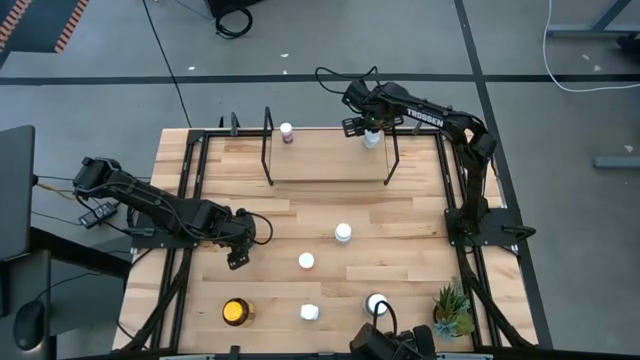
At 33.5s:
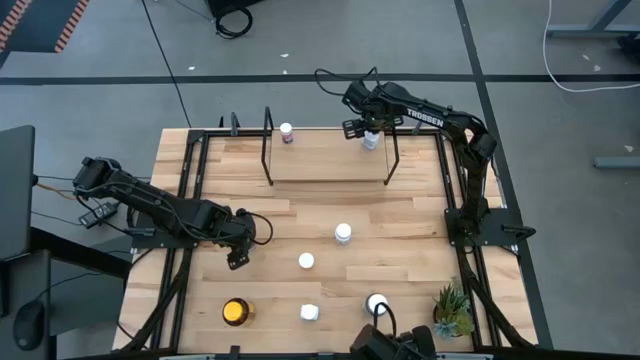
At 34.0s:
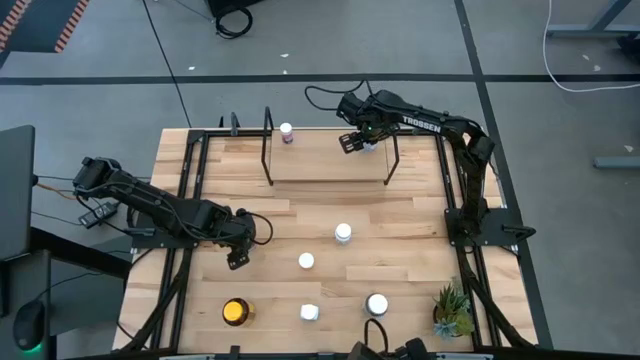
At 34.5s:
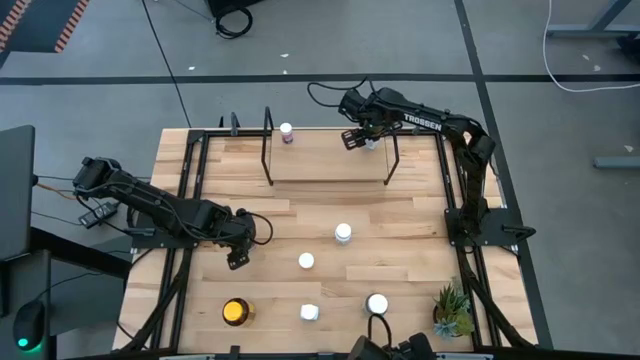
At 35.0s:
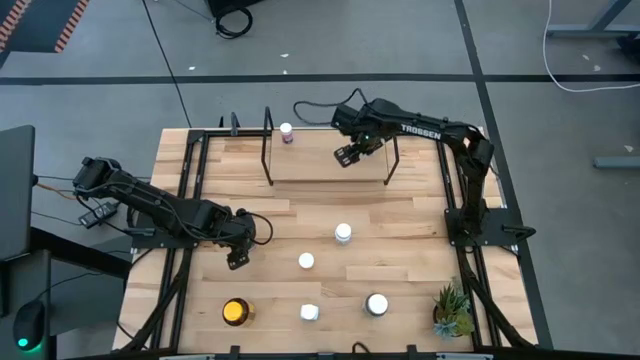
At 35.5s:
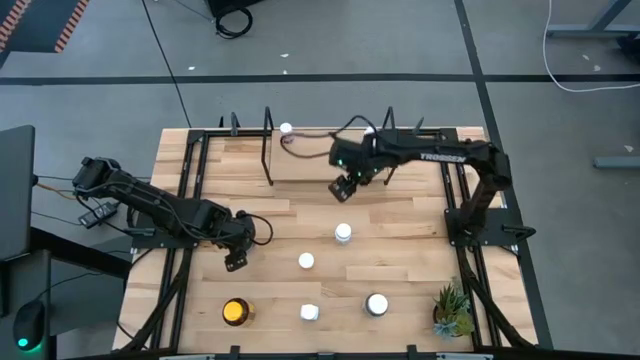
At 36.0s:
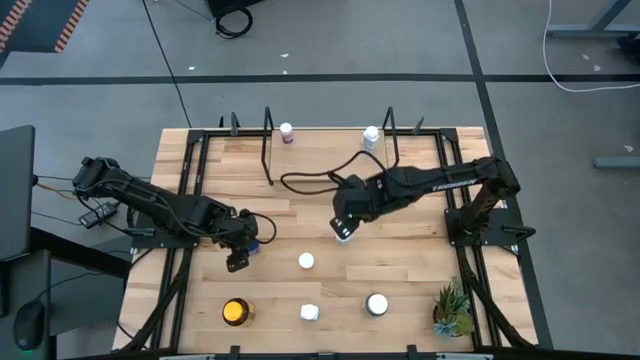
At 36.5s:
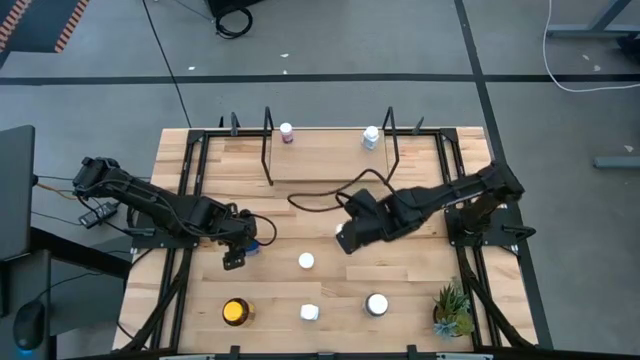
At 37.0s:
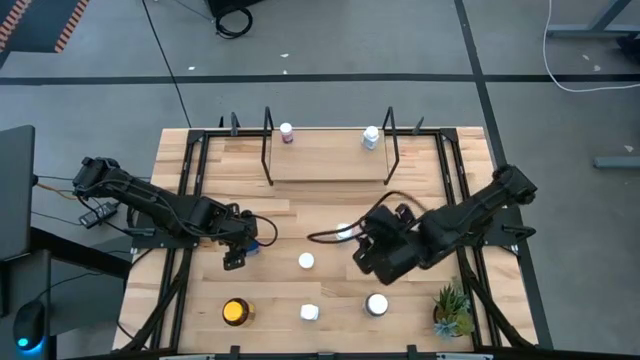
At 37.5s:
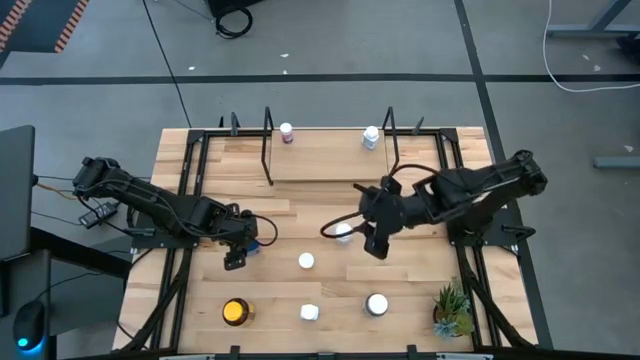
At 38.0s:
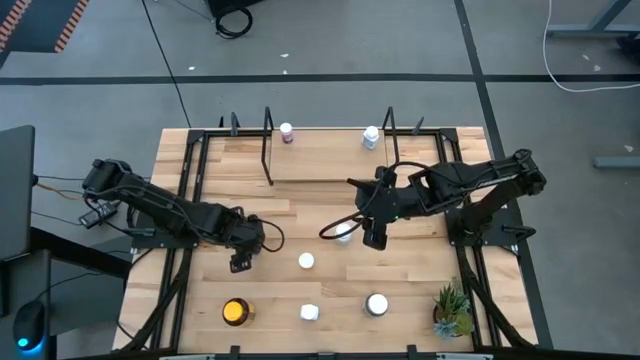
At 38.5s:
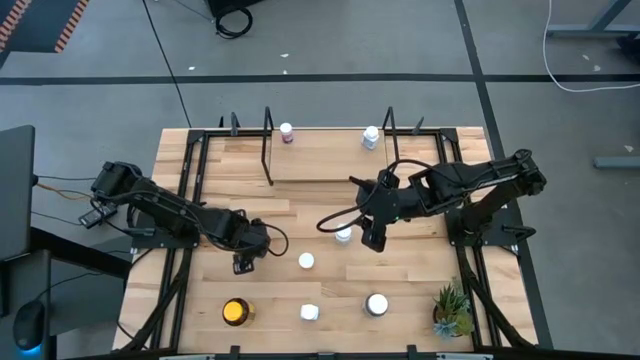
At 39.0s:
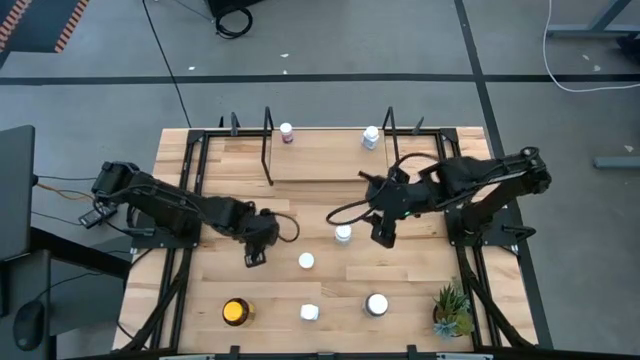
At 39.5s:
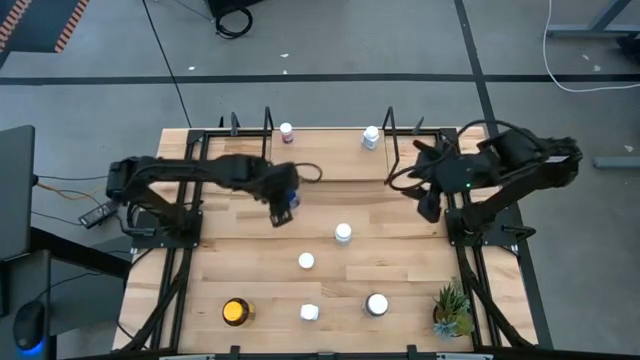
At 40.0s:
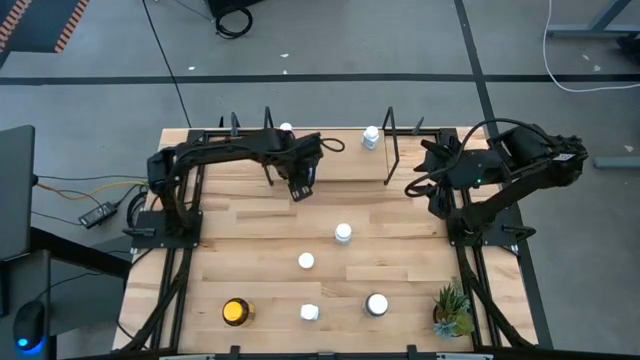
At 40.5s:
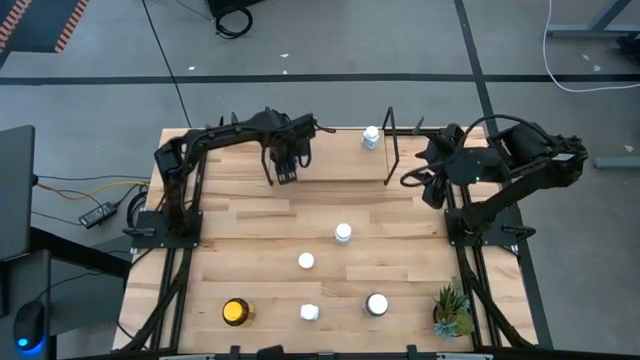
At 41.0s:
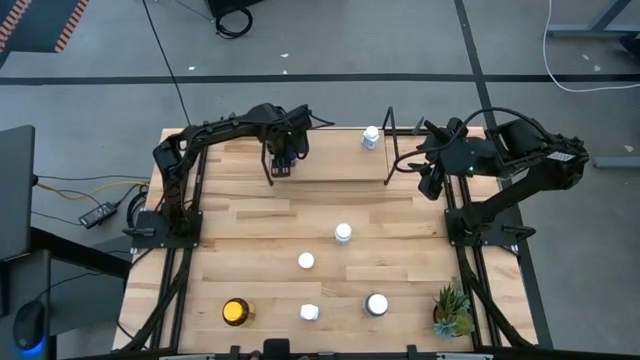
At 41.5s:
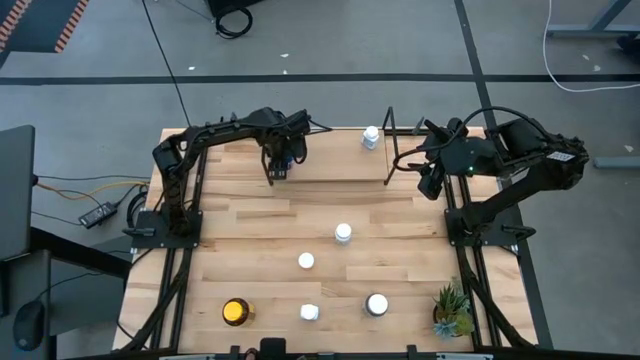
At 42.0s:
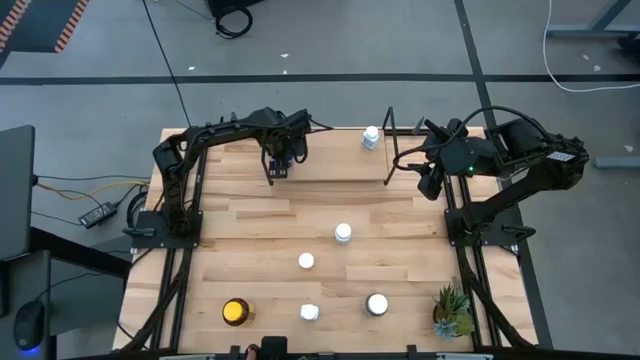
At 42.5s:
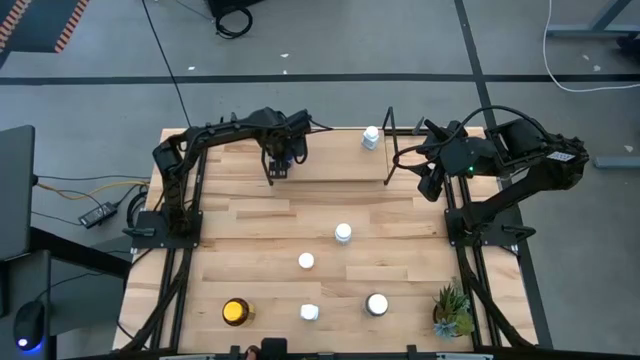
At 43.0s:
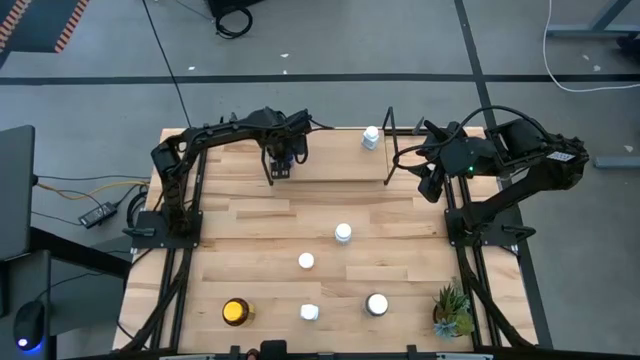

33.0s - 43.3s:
Task: Pick and place medicine bottles onto shelf by color
Put the blue pill bottle on the shelf

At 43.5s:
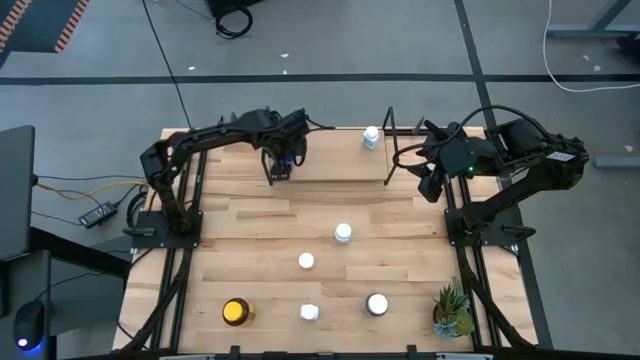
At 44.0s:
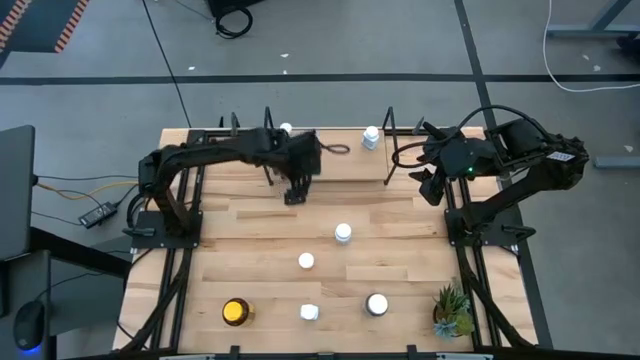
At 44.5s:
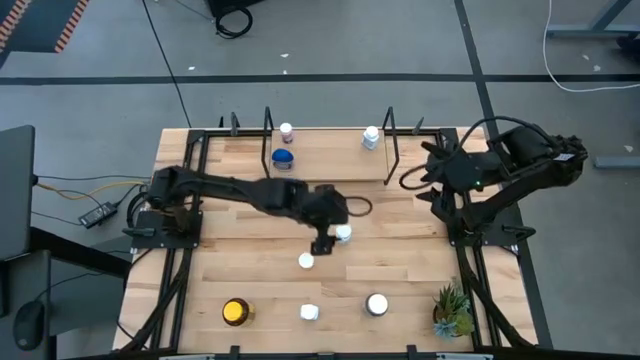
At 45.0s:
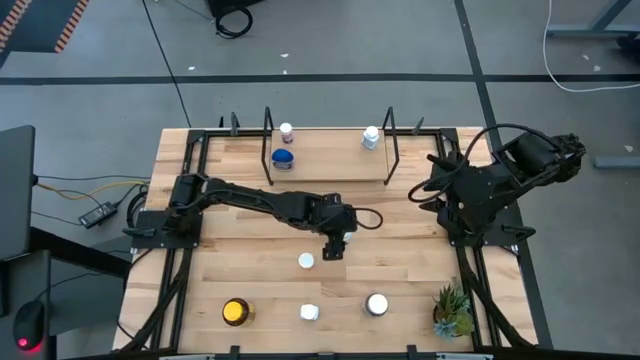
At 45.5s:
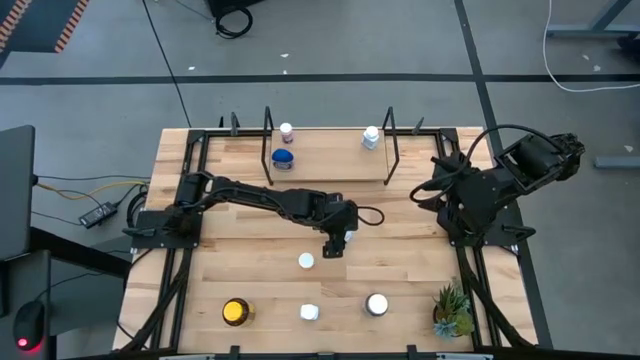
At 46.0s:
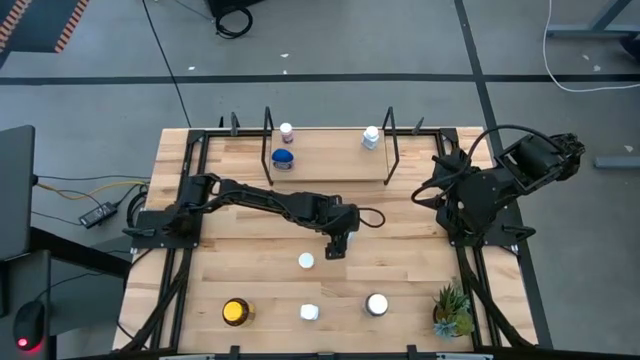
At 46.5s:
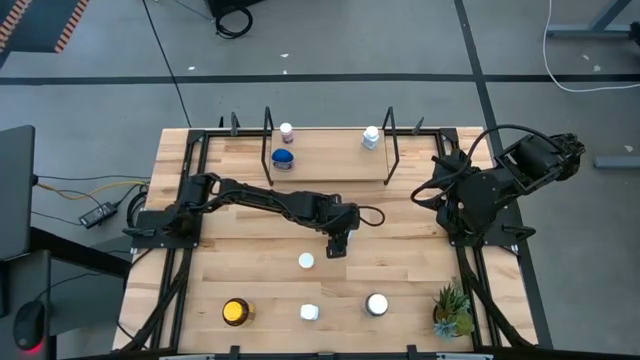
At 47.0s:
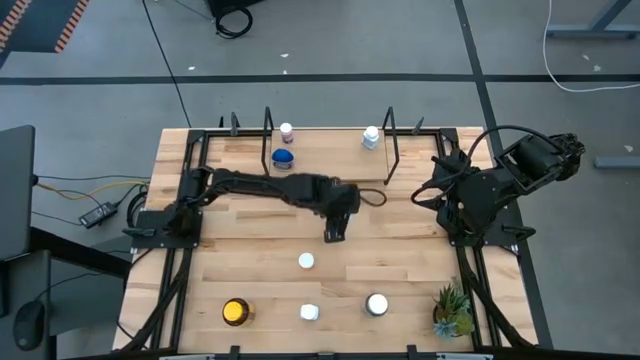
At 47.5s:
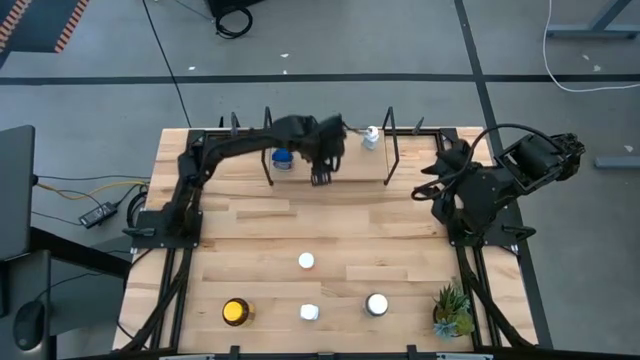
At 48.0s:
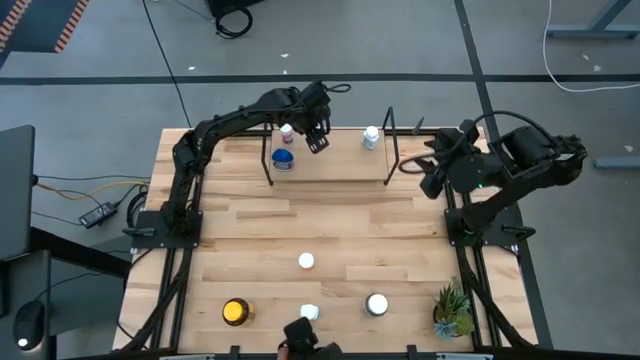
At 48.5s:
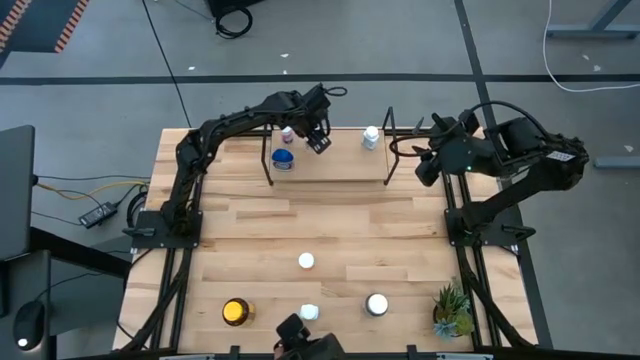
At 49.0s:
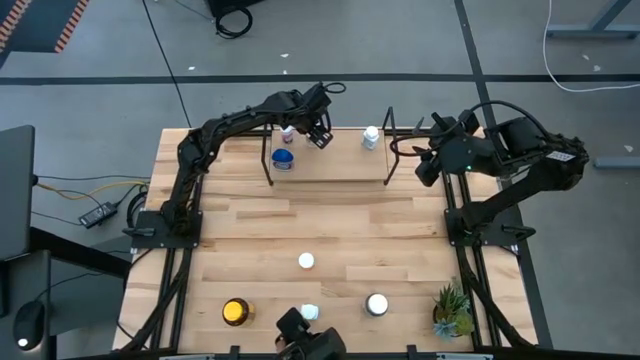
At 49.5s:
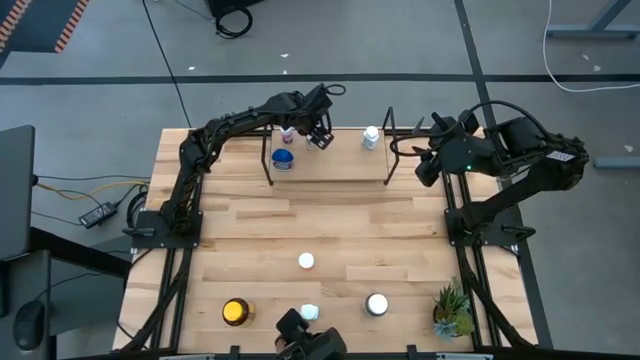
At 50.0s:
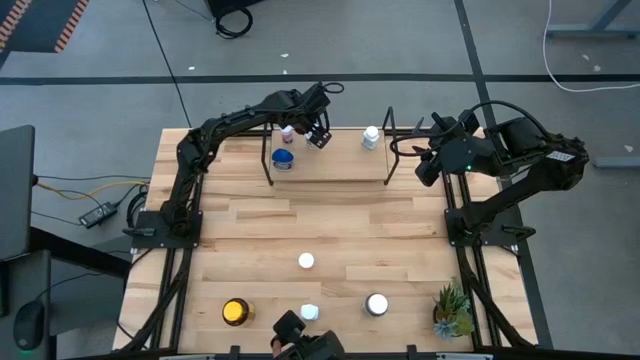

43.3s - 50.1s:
Put the top white pill bottle on the shelf

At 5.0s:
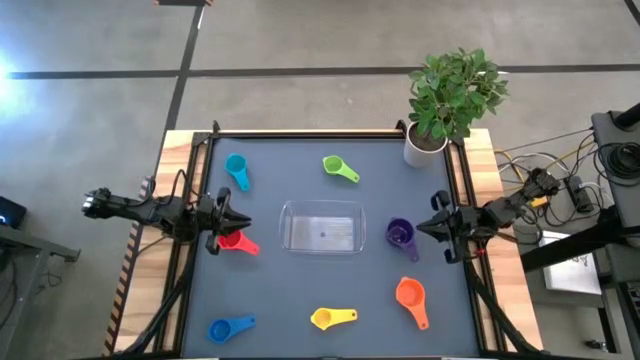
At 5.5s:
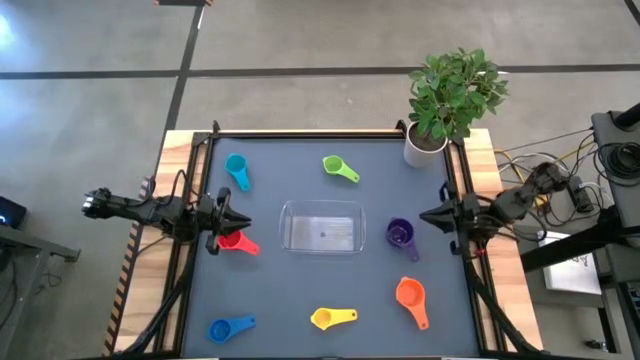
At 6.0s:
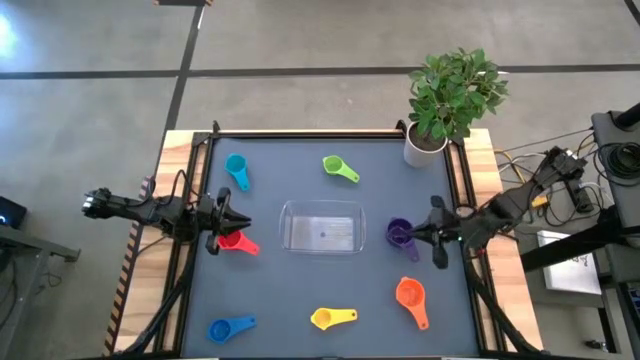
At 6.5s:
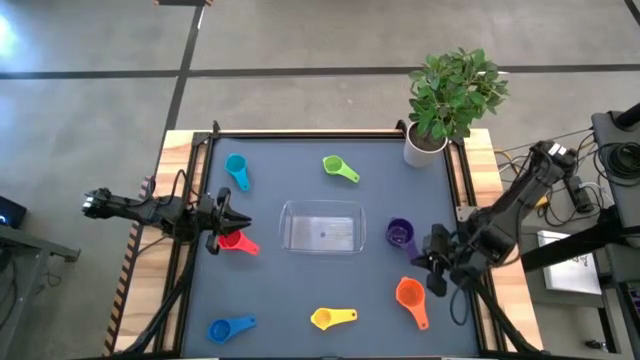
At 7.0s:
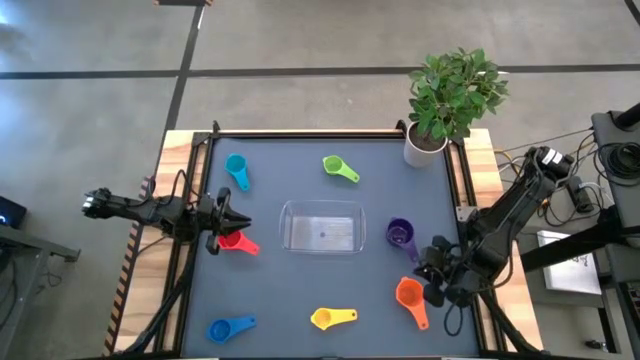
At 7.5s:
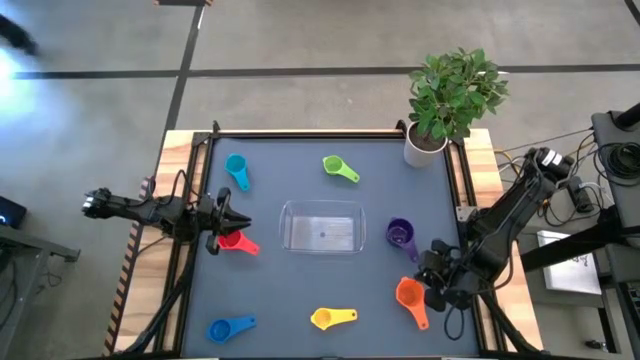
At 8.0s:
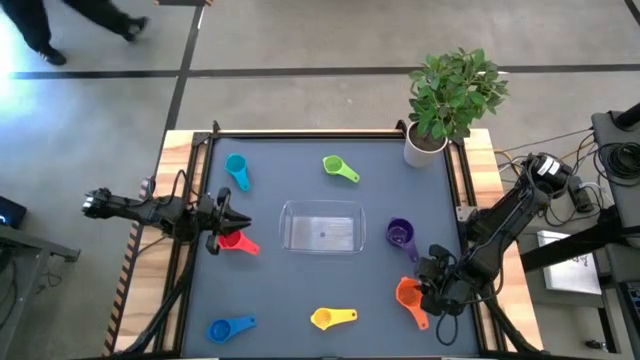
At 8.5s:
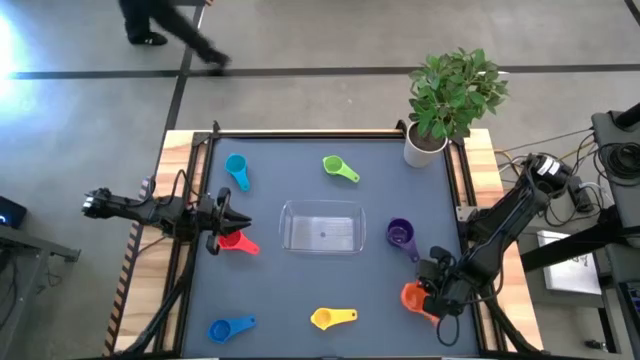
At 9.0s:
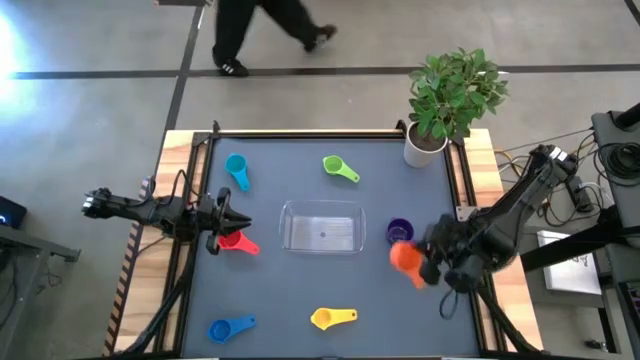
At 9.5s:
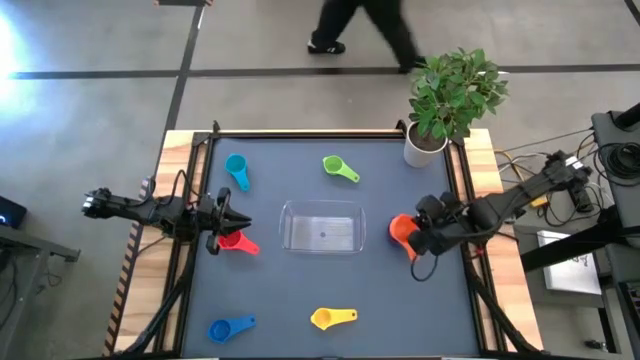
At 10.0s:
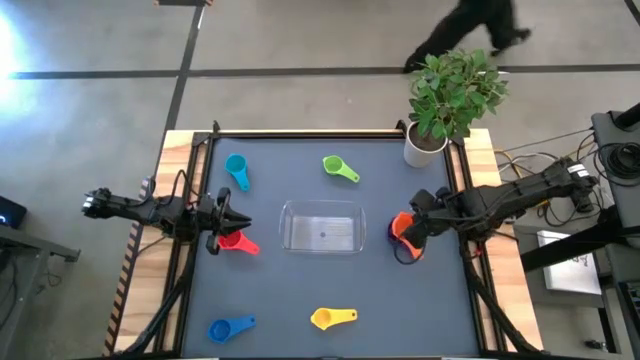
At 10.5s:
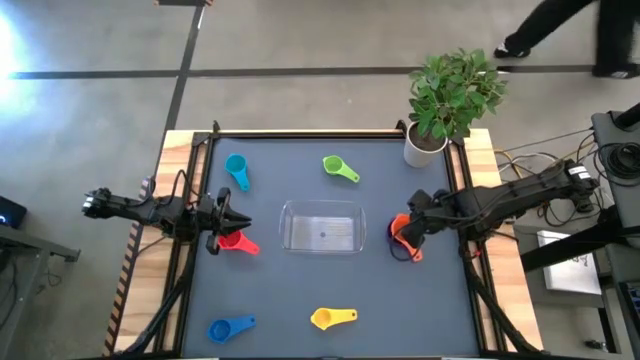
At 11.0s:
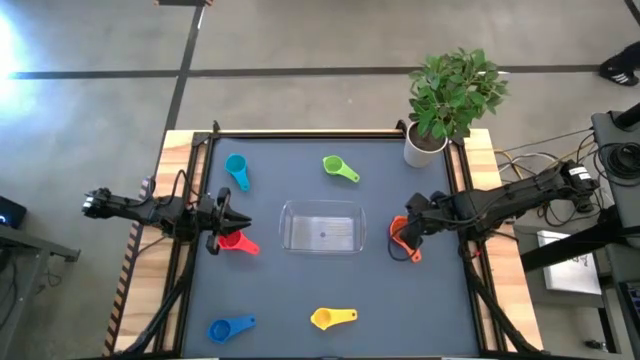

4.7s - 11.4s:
Task: Nest measuring cups in basket
Stack the orange measuring cup on top of the violet measuring cup
